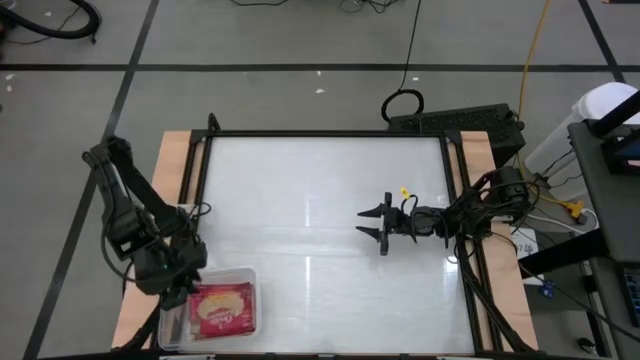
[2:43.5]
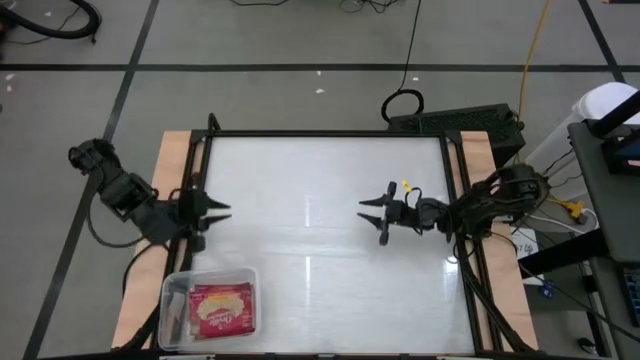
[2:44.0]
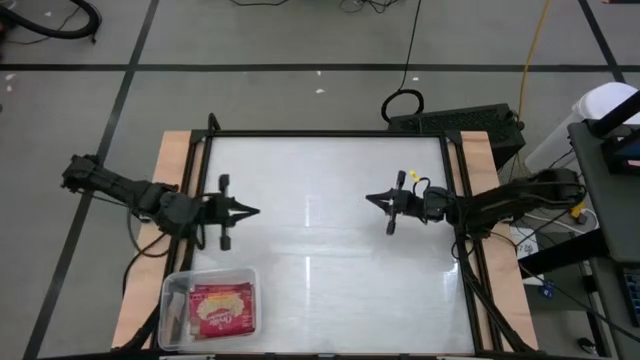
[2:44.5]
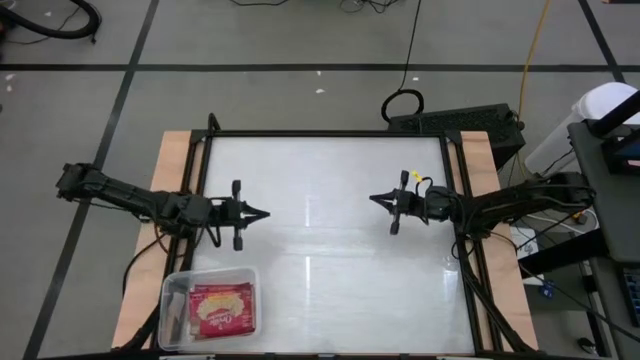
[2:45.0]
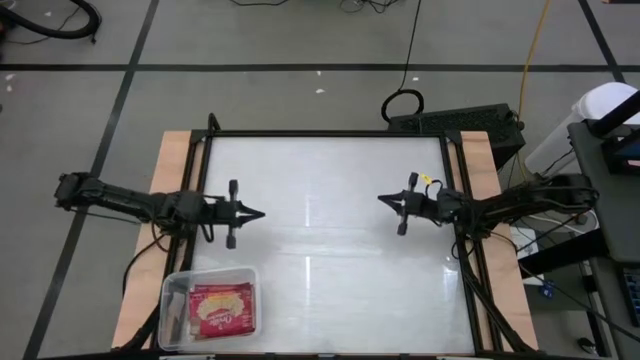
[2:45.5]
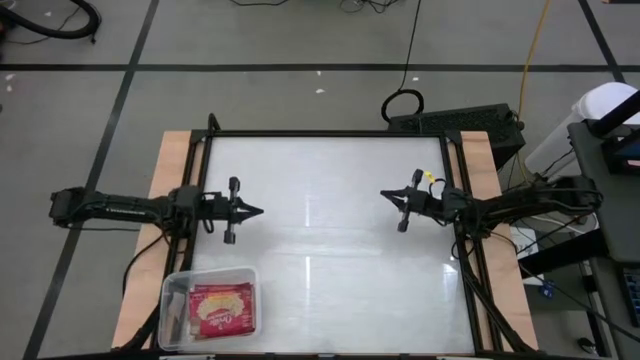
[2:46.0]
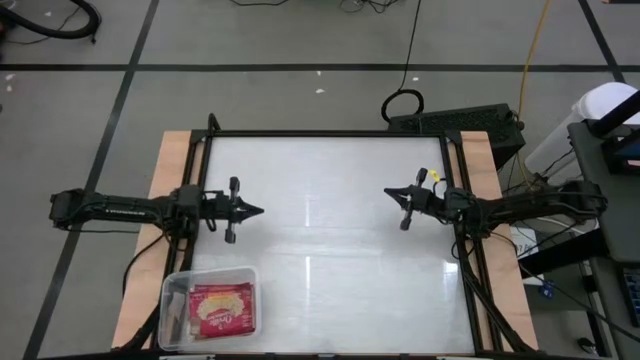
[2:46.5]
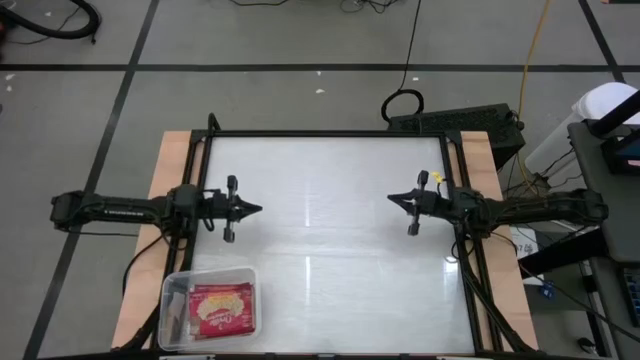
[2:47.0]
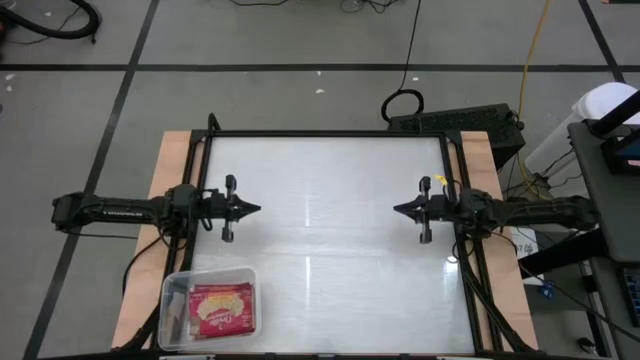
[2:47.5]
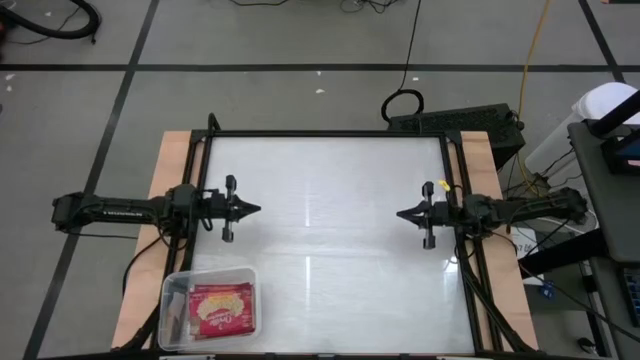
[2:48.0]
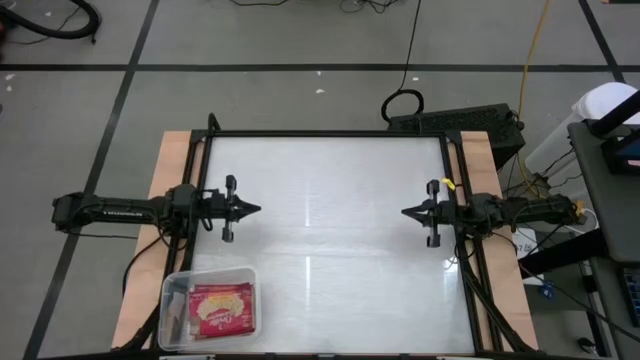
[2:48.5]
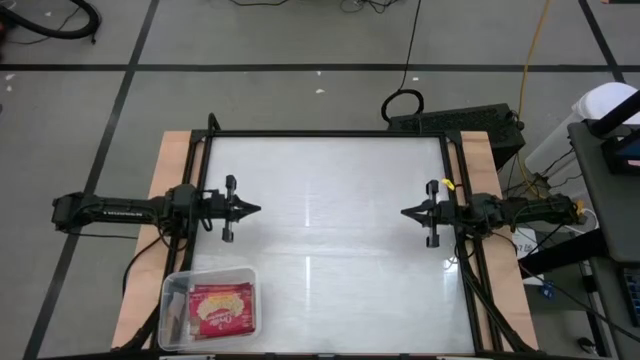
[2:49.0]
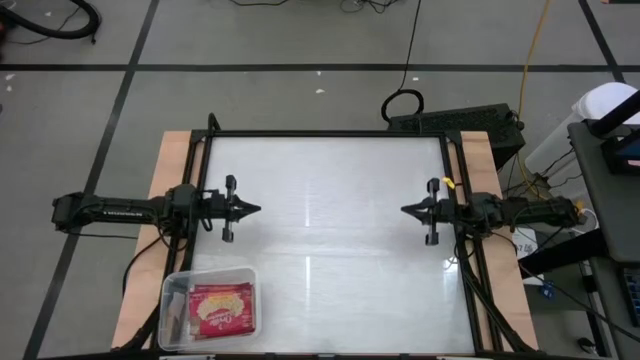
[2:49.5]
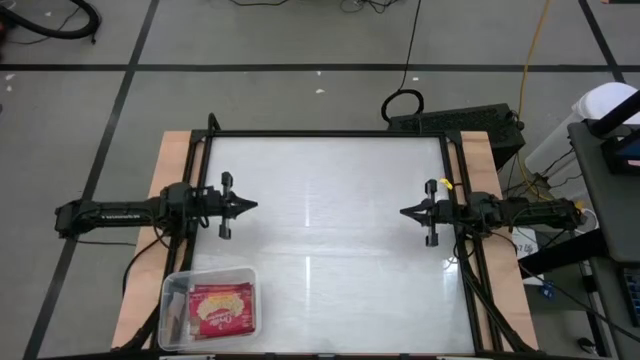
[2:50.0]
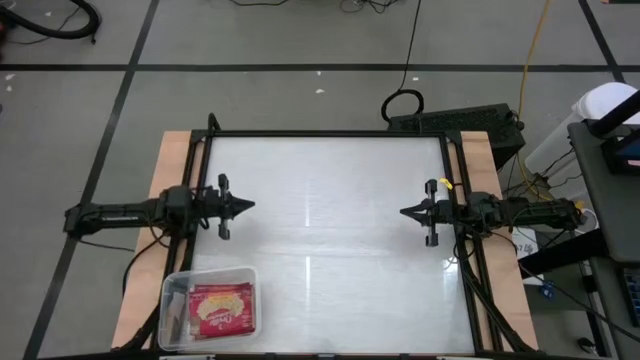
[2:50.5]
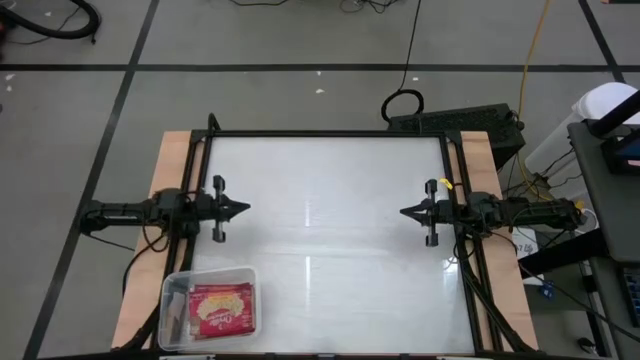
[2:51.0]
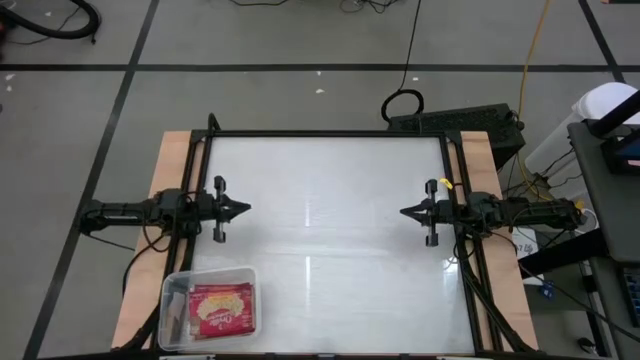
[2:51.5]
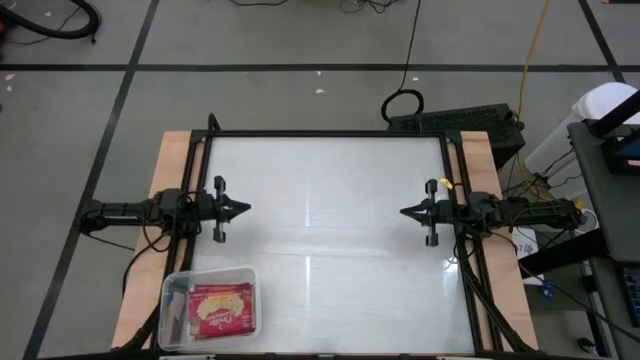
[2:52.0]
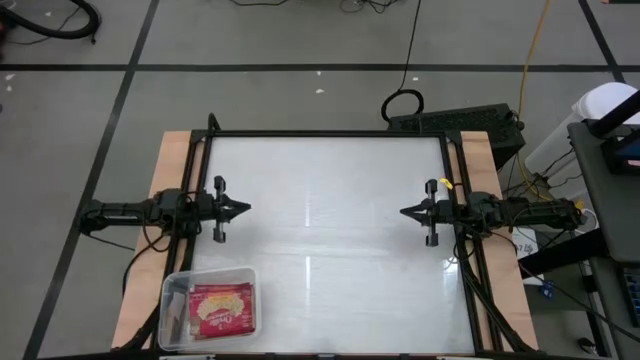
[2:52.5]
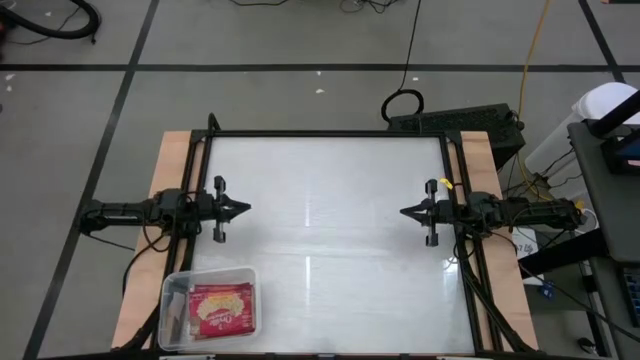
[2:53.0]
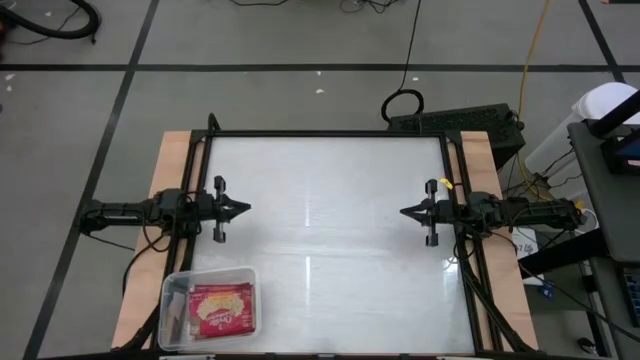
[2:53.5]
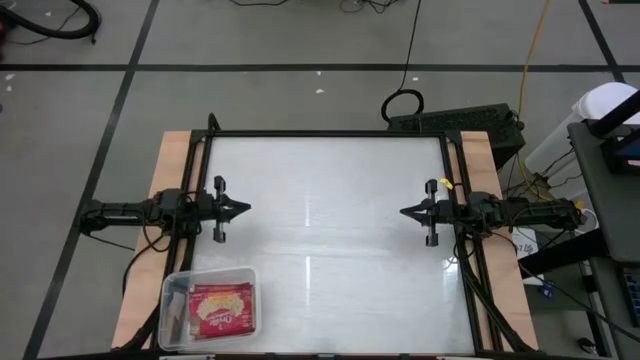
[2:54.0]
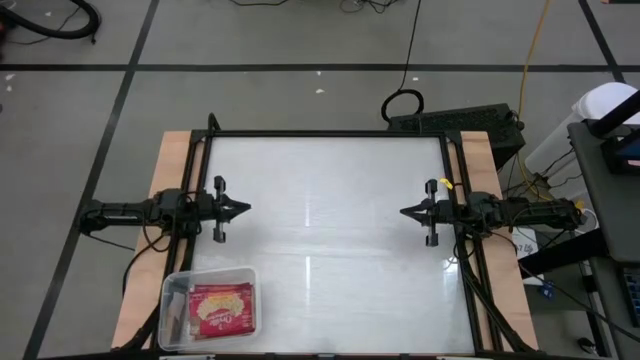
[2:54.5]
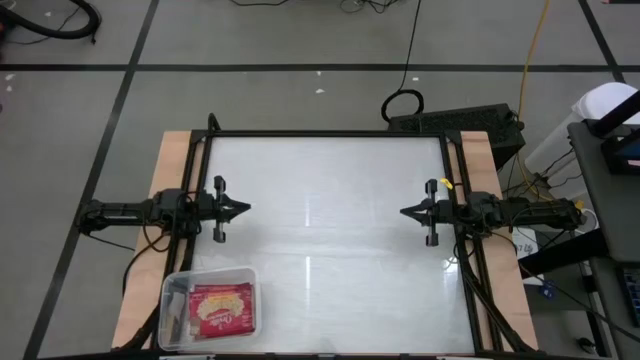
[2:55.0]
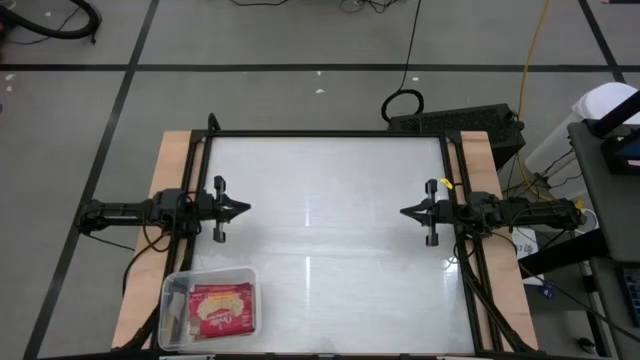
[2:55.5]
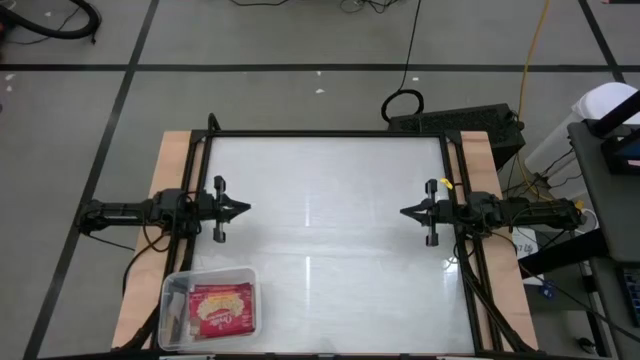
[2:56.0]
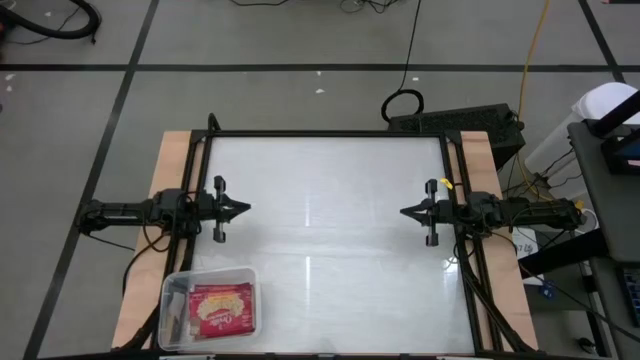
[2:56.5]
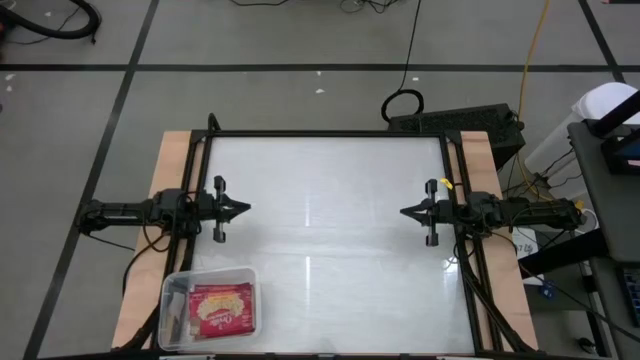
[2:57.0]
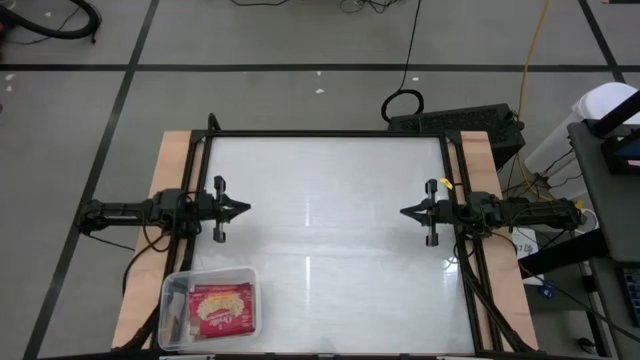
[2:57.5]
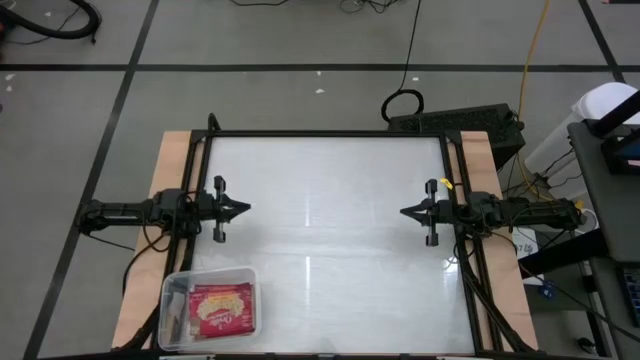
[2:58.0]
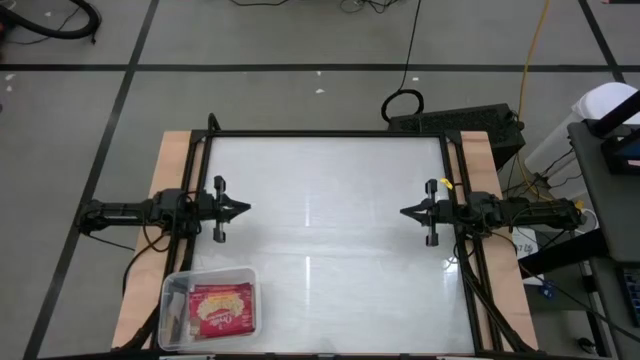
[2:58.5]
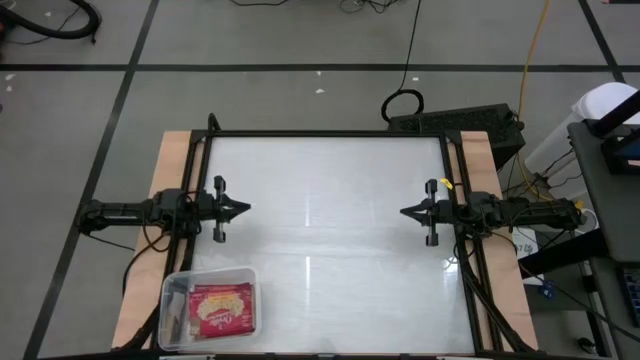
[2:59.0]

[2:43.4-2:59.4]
Task: Sort popcorn bags into baskets
Return to Home Position

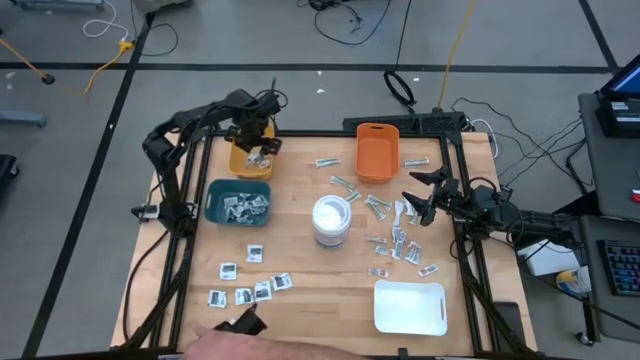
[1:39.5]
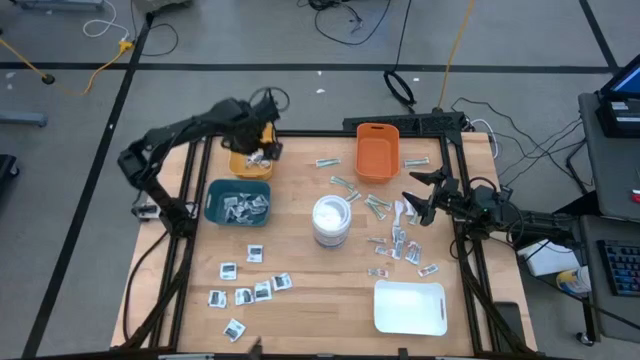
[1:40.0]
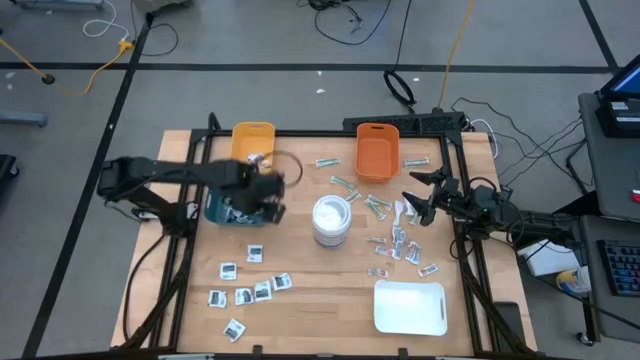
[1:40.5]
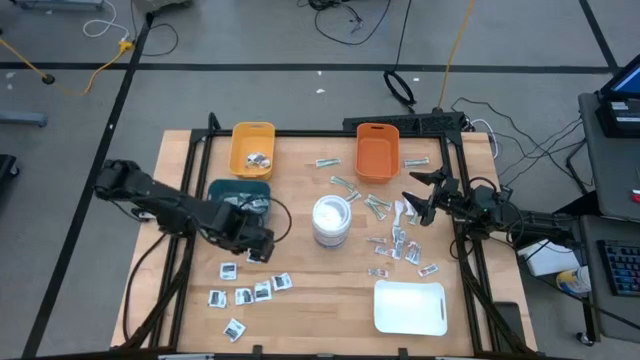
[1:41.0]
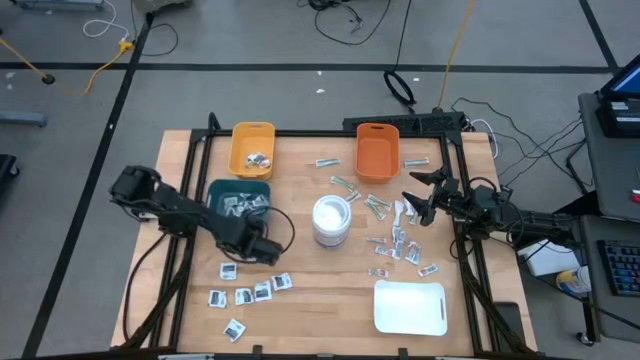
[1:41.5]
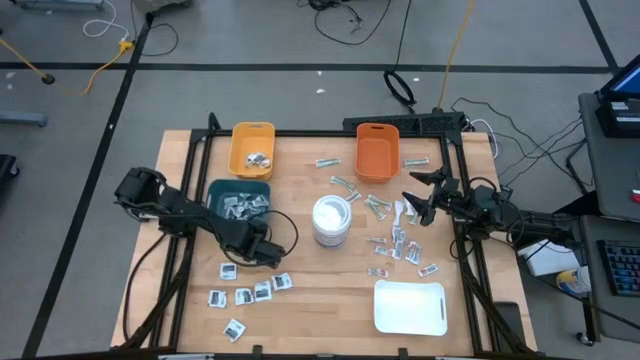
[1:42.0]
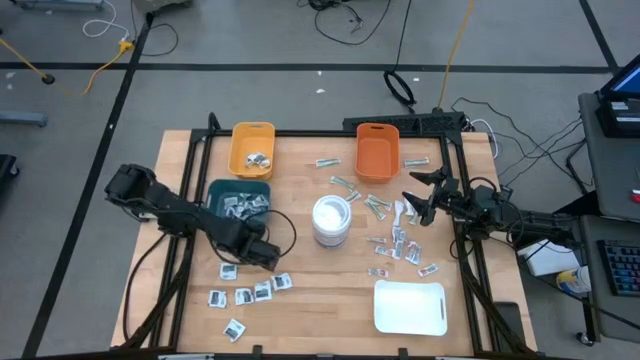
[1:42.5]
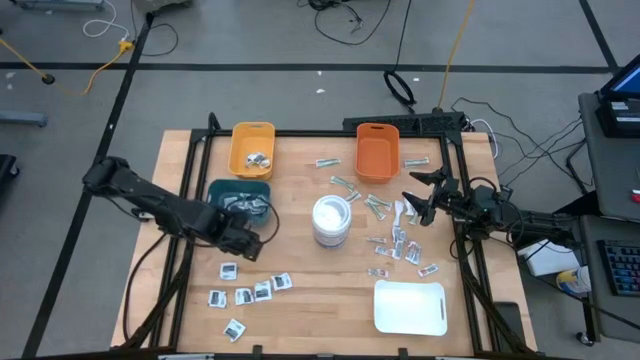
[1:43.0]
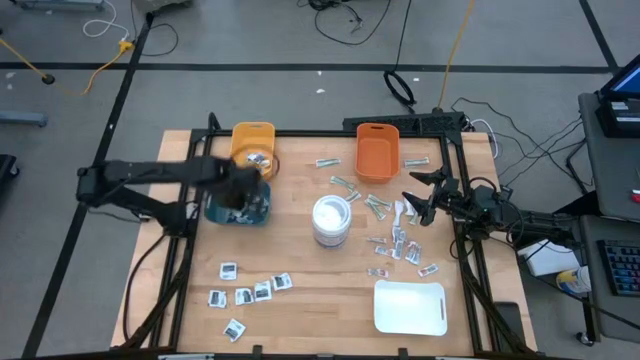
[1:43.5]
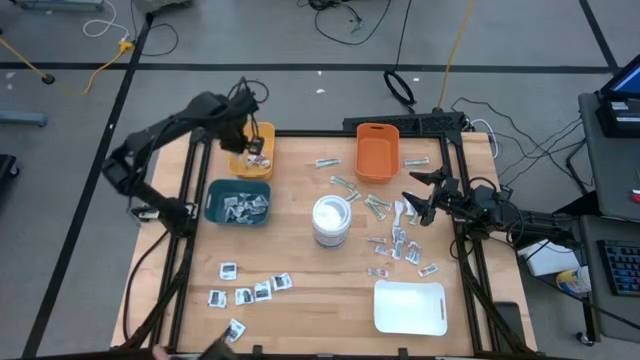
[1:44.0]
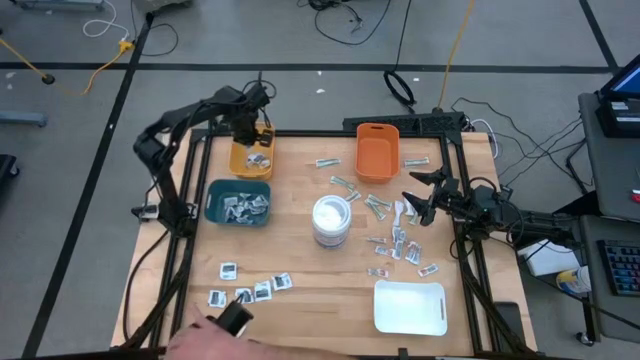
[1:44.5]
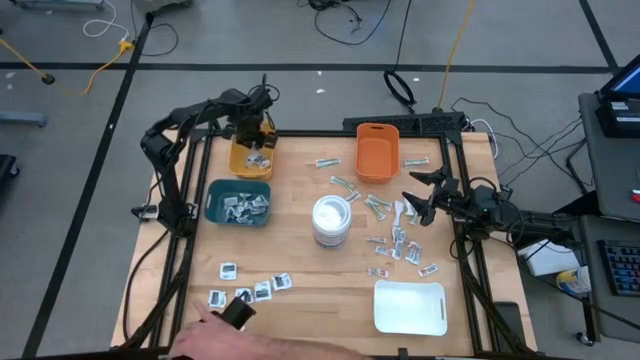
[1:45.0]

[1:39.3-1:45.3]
Task: Pick & Place First Aid Supplies
Put the black pad into the yellow bin
